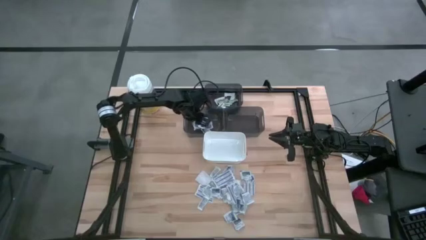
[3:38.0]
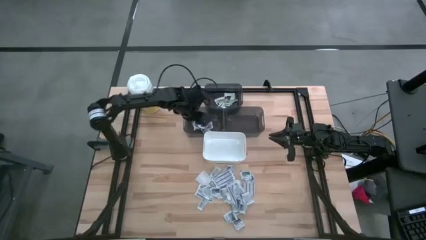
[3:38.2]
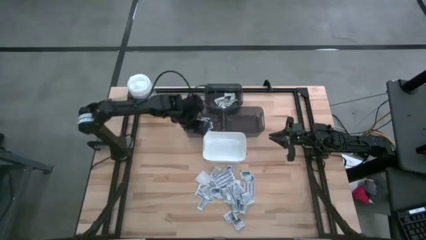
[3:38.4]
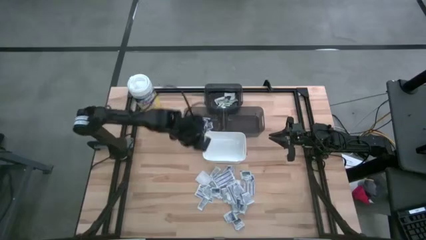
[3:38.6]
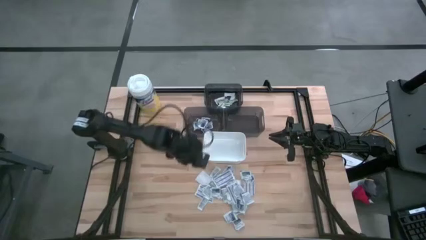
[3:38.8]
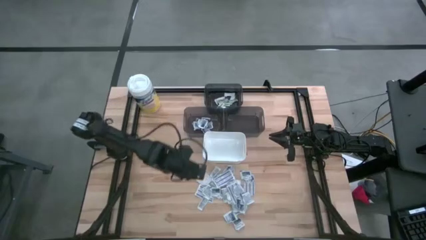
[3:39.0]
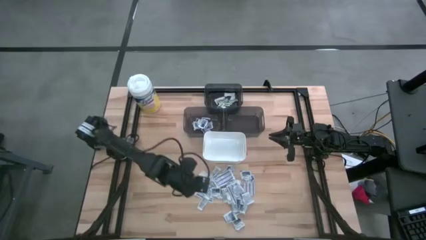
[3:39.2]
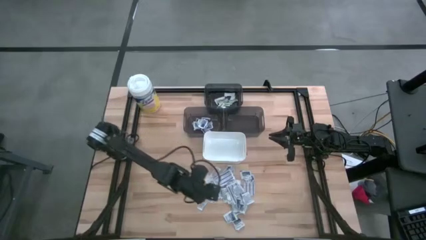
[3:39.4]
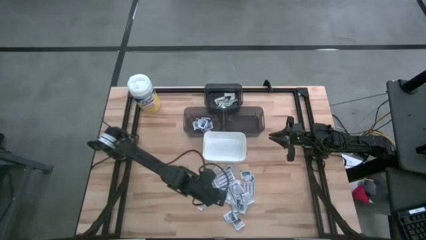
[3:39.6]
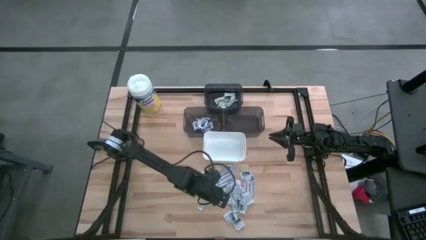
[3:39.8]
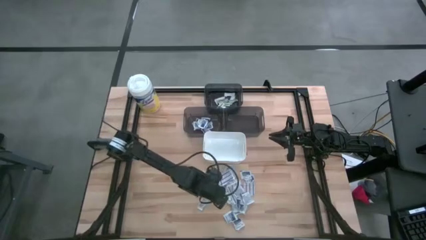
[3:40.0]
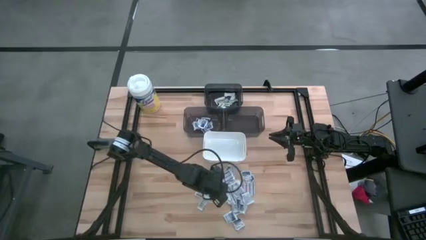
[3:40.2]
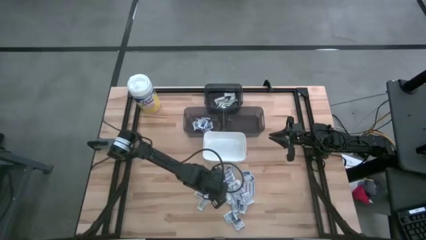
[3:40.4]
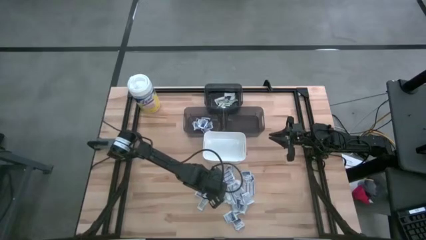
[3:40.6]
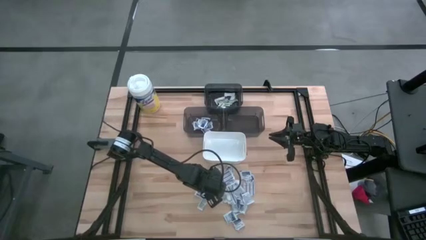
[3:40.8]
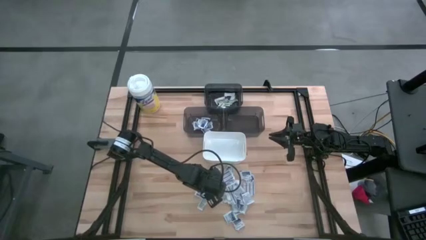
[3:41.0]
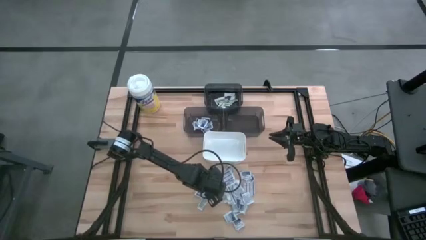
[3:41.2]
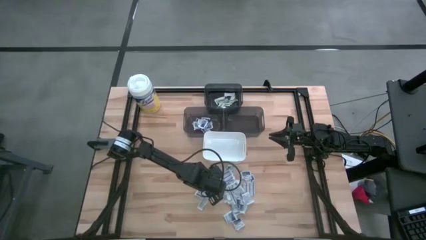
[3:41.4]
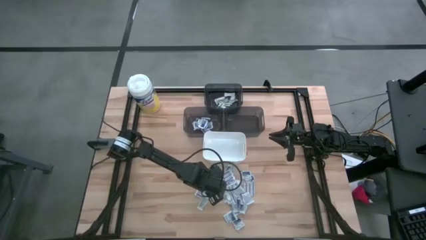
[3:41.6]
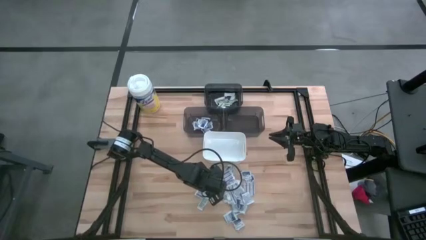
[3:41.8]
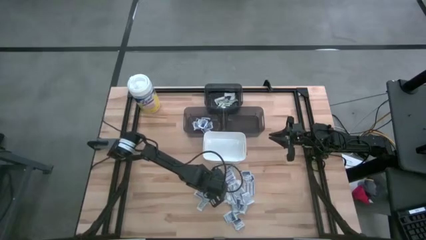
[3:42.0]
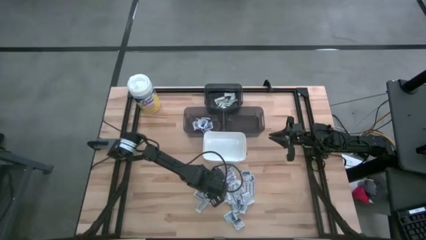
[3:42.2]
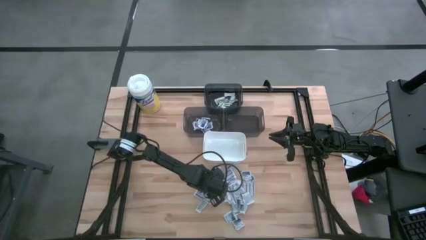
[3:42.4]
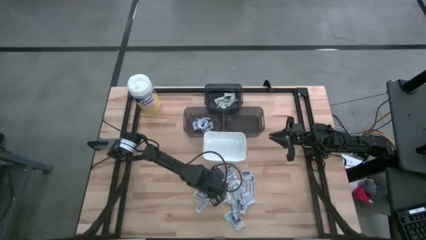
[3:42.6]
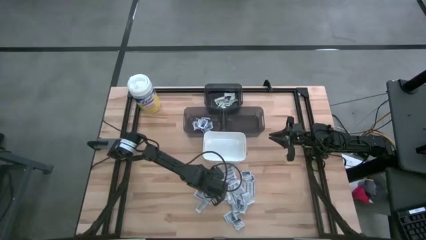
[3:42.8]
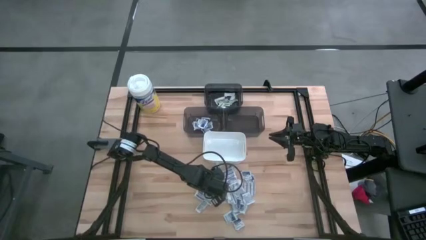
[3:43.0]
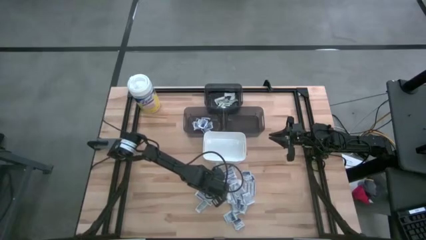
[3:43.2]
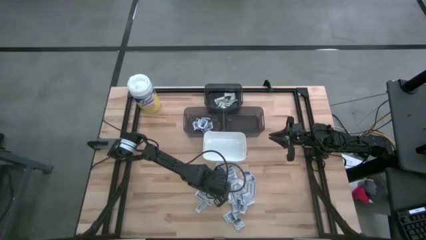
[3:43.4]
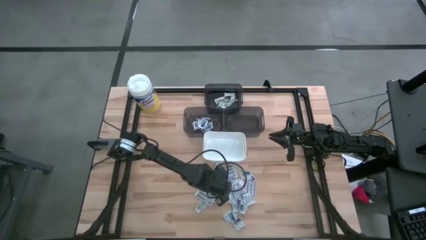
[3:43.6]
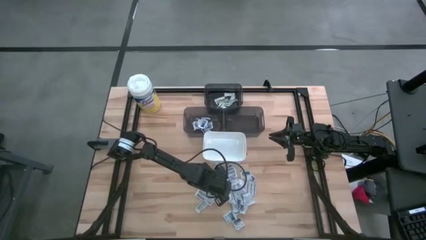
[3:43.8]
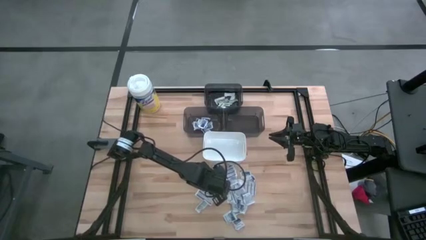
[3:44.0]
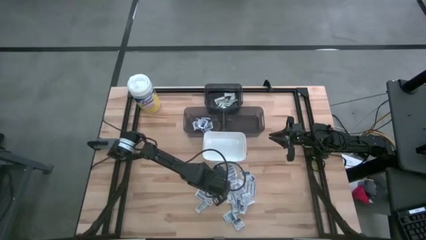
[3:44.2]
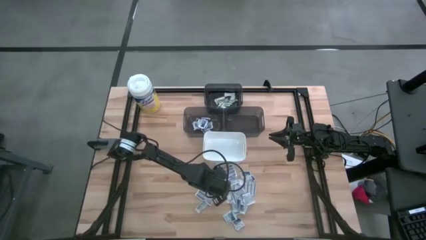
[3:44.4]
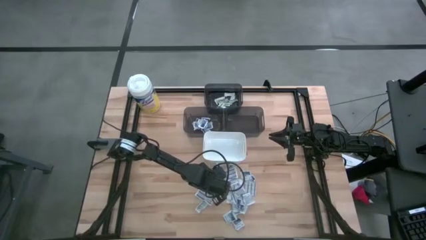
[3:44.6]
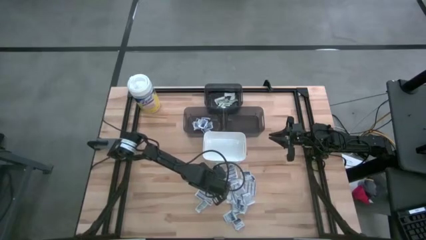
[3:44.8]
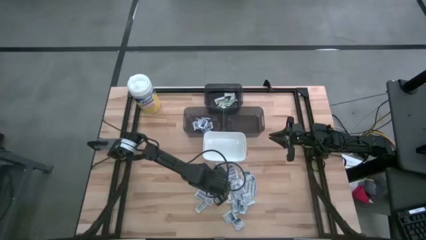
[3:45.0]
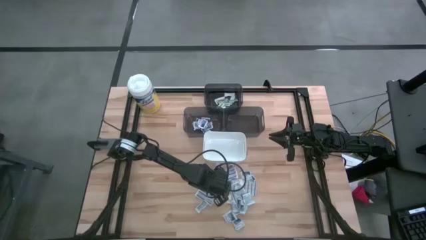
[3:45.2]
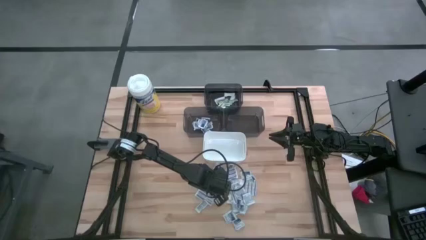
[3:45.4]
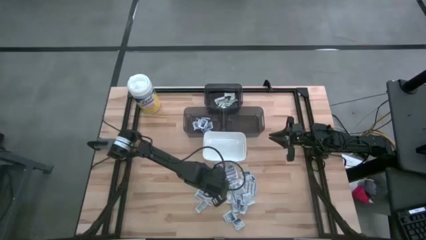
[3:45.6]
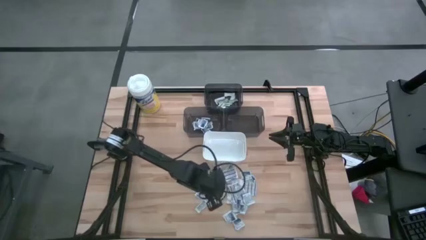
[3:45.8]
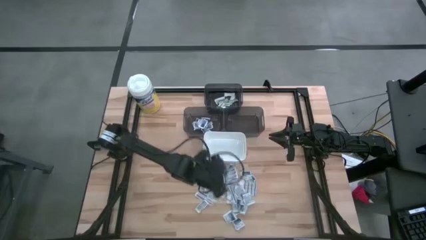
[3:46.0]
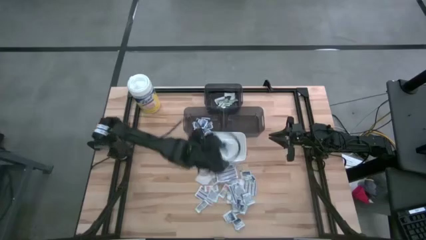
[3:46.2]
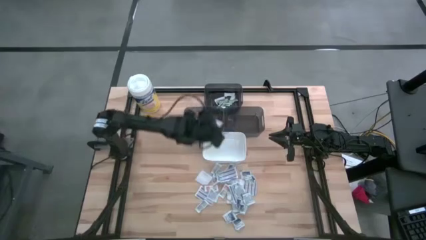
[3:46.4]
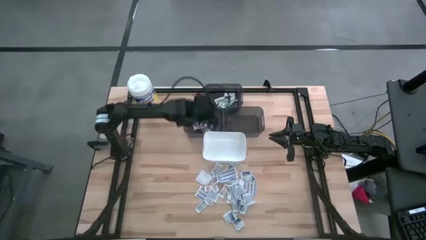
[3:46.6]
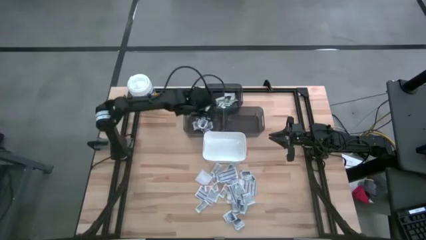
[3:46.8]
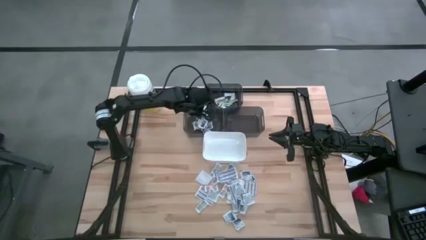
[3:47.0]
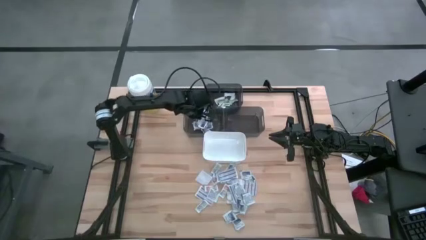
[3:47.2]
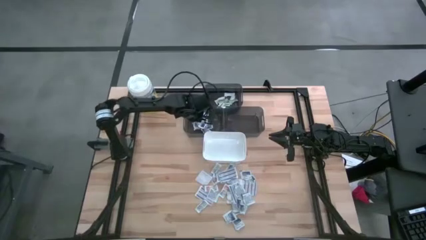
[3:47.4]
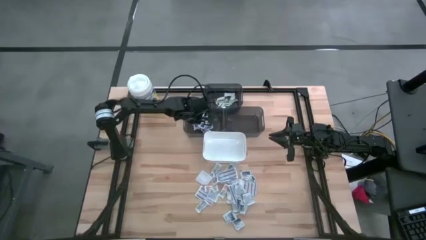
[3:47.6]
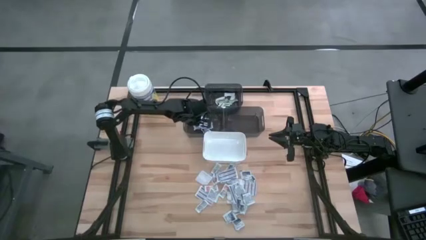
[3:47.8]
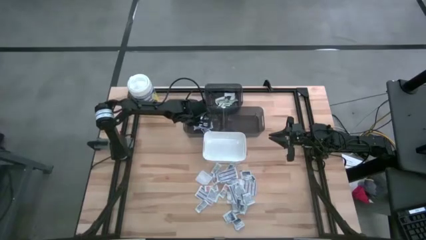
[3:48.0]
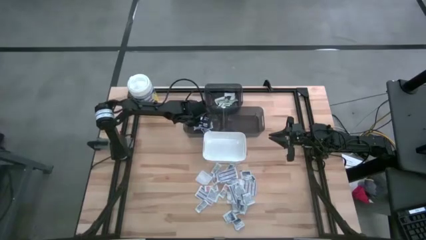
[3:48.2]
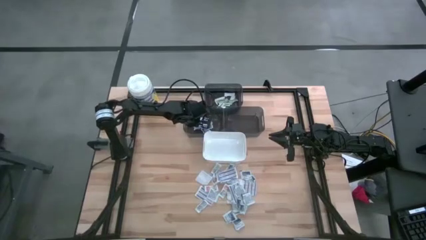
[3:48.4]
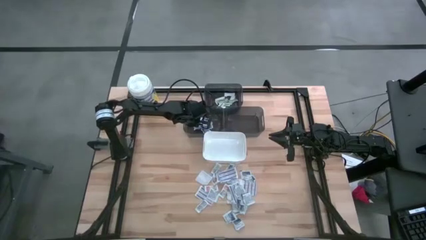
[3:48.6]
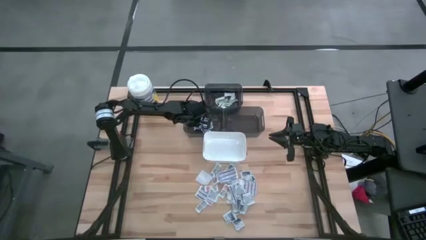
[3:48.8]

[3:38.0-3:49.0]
Task: Pick & Place First Aid Supplies
Put the alcohol pad into the left black bin

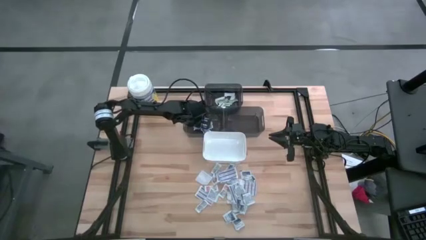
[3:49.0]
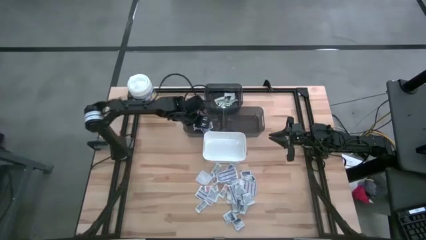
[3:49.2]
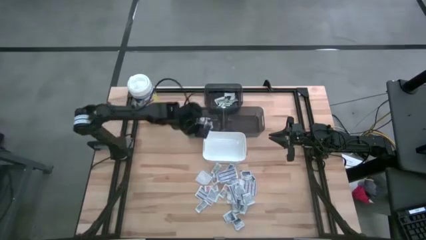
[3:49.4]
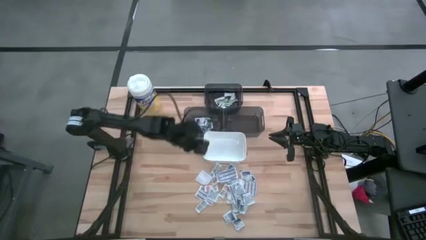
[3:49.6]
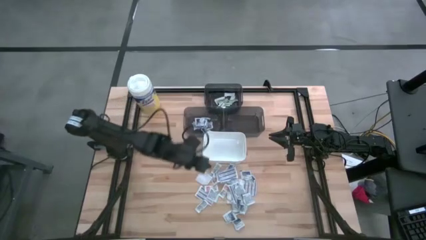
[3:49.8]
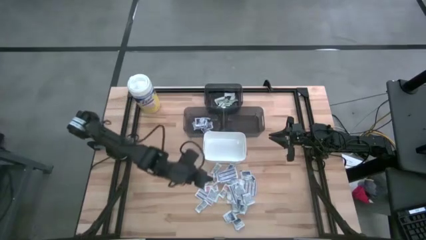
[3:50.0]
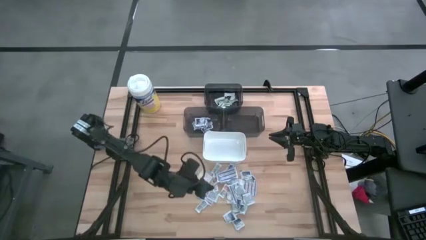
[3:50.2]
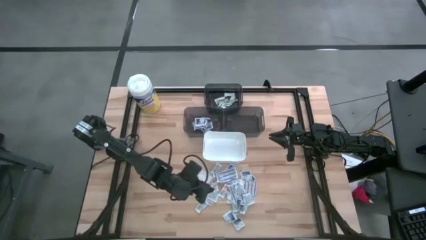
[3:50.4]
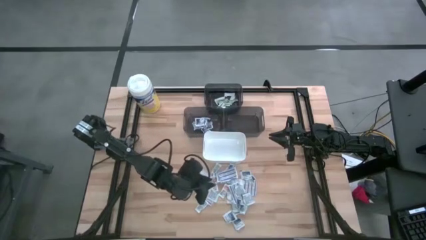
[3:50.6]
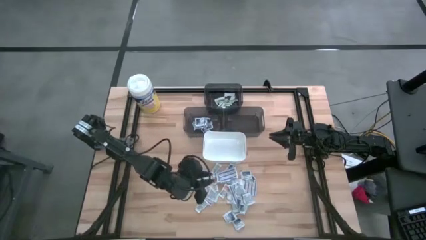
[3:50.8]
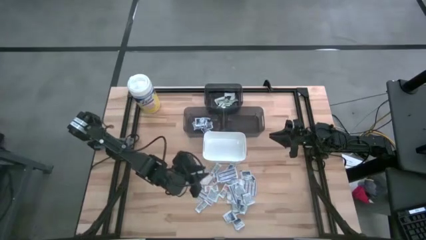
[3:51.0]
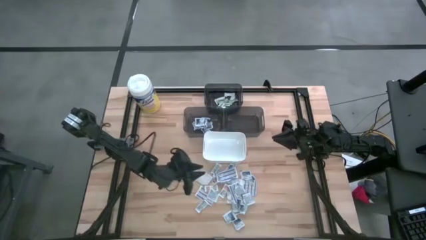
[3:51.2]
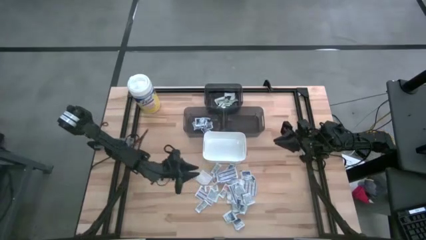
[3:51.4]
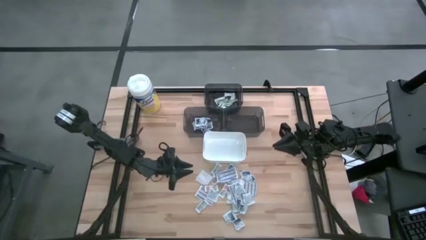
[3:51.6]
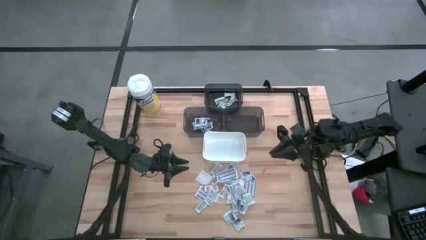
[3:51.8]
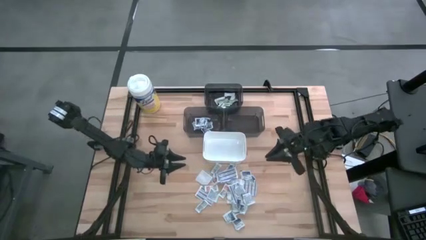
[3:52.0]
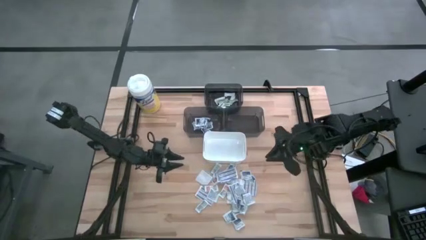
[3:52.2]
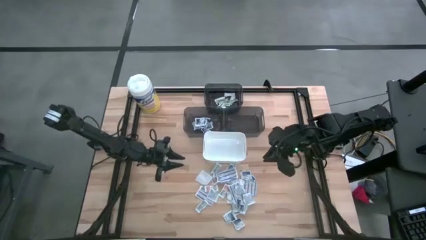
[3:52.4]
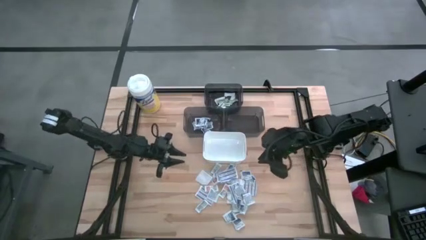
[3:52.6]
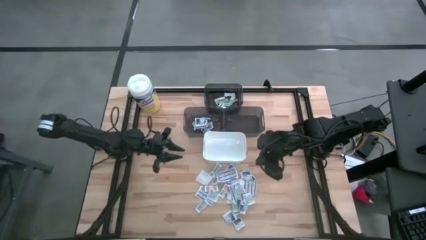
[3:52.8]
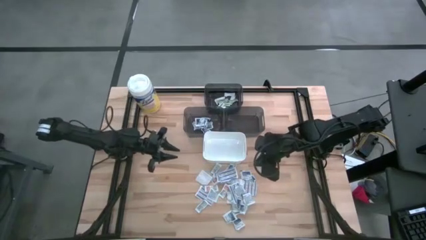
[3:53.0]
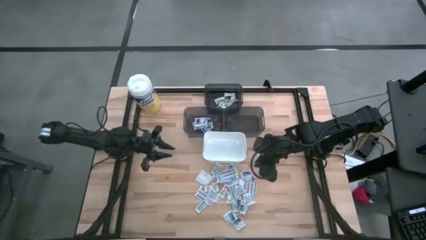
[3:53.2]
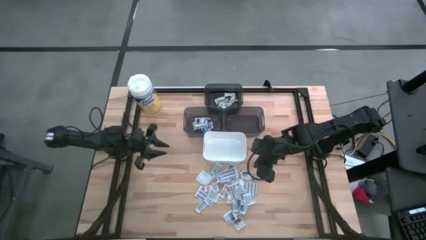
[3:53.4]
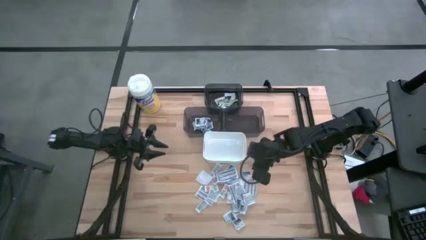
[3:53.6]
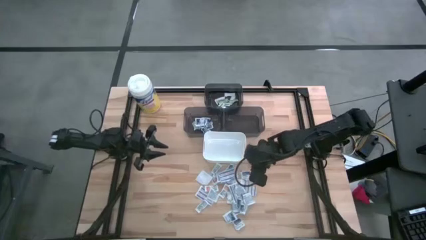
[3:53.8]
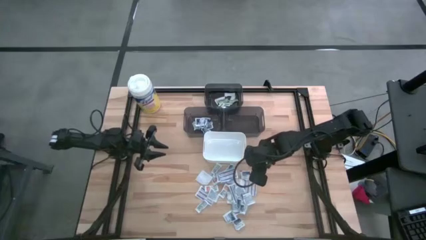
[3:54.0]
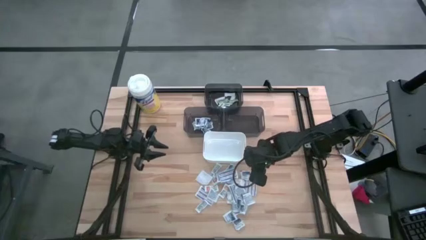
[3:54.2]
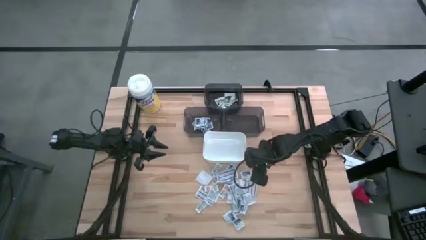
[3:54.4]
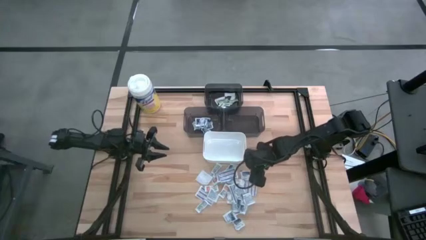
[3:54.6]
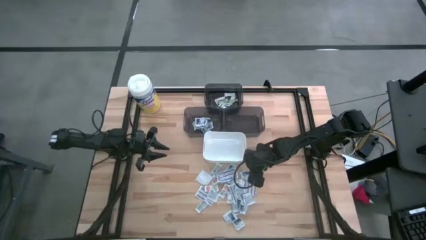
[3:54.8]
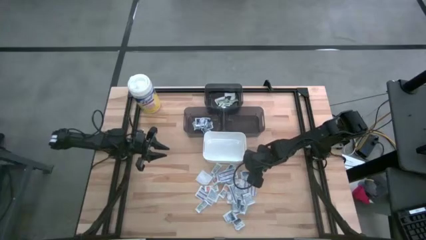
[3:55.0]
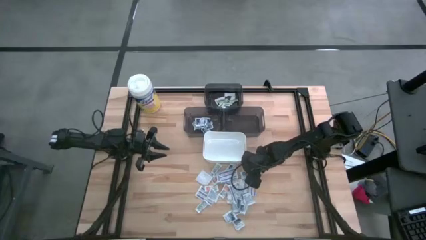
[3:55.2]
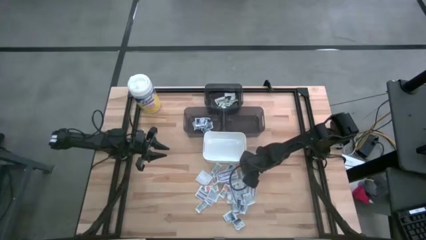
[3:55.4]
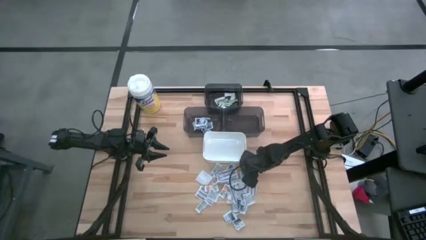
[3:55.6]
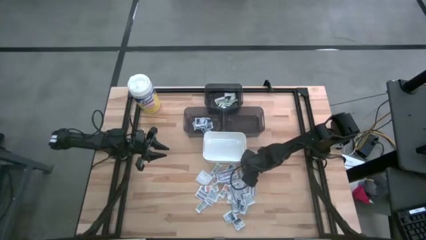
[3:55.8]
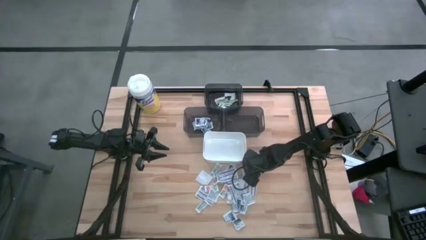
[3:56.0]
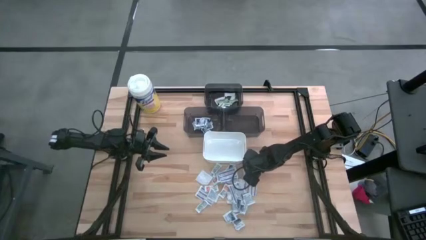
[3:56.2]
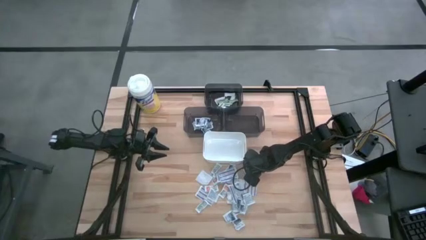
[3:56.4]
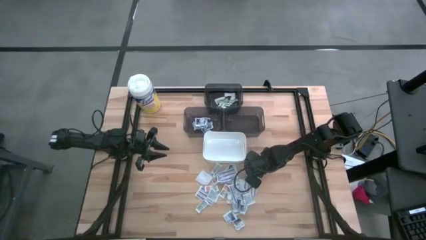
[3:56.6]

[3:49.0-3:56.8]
Put the alcohol pad into the left black bin
